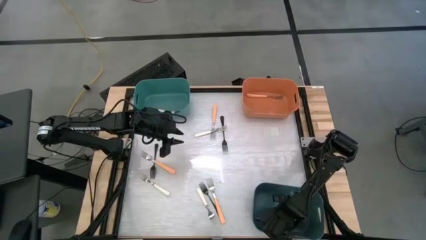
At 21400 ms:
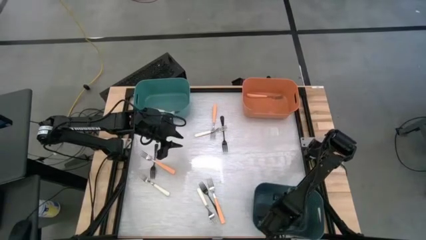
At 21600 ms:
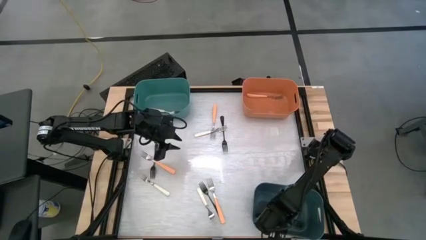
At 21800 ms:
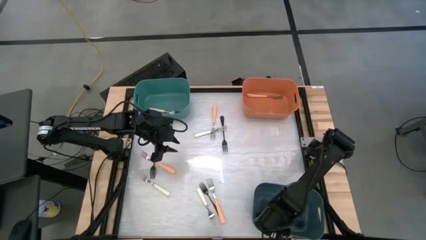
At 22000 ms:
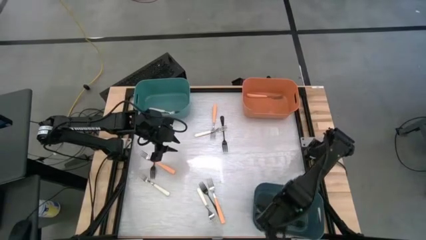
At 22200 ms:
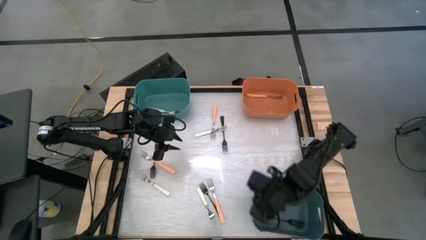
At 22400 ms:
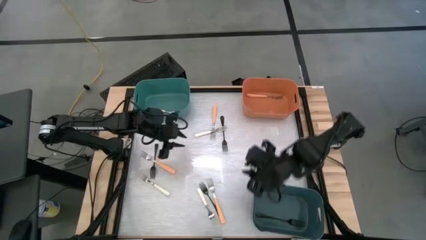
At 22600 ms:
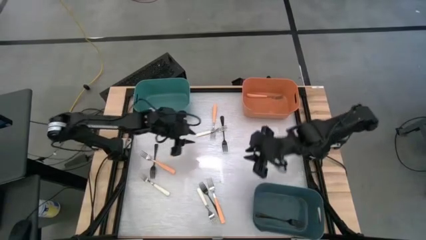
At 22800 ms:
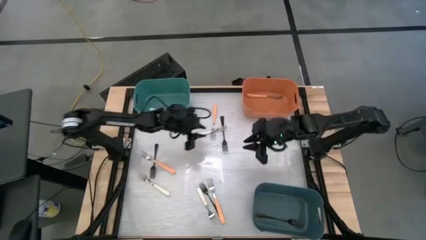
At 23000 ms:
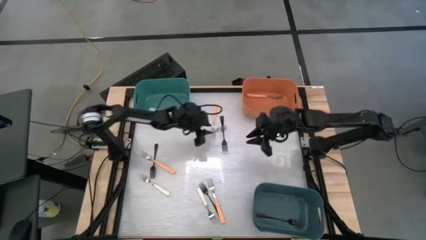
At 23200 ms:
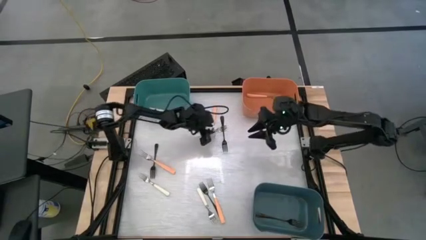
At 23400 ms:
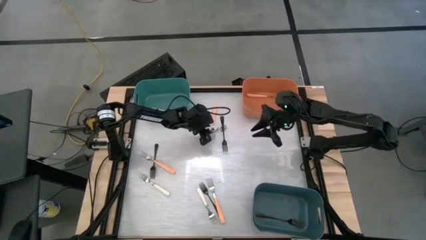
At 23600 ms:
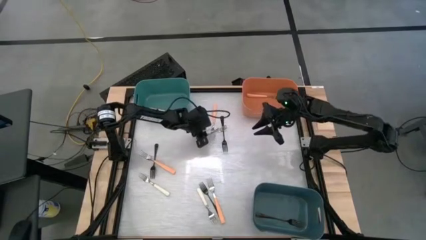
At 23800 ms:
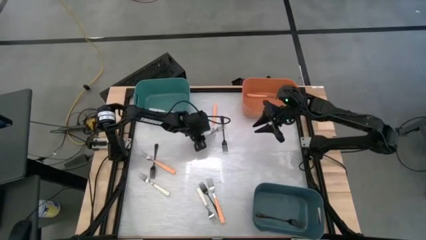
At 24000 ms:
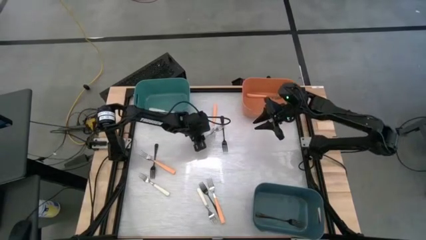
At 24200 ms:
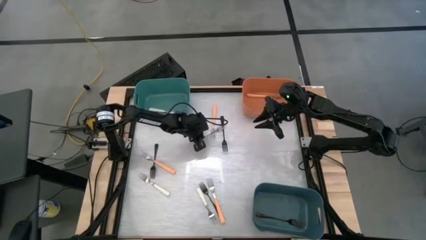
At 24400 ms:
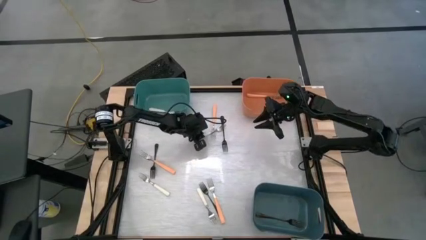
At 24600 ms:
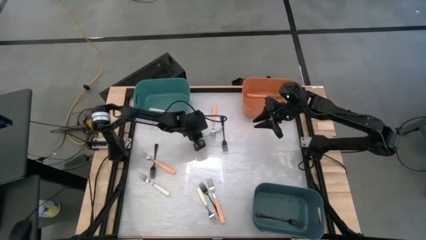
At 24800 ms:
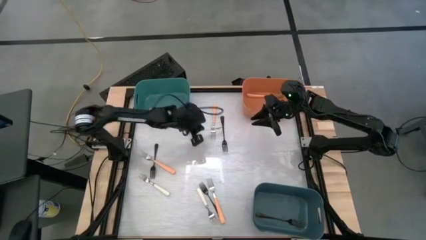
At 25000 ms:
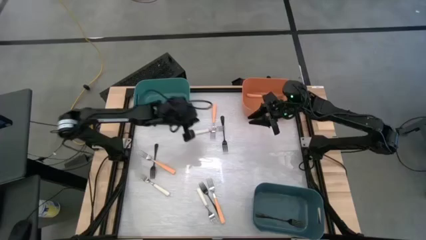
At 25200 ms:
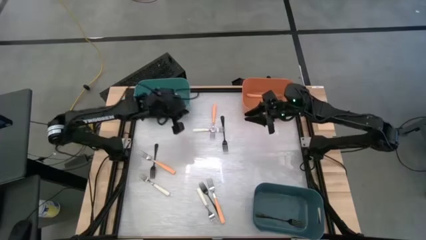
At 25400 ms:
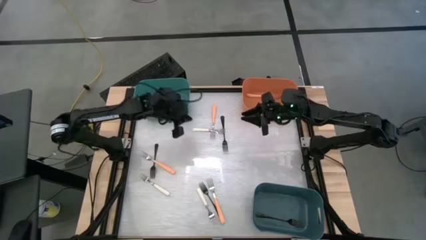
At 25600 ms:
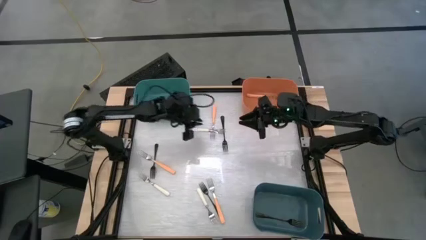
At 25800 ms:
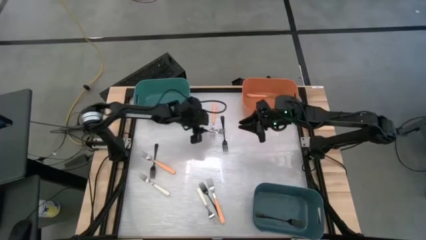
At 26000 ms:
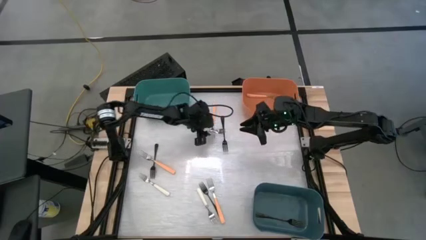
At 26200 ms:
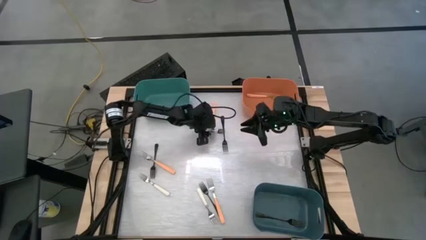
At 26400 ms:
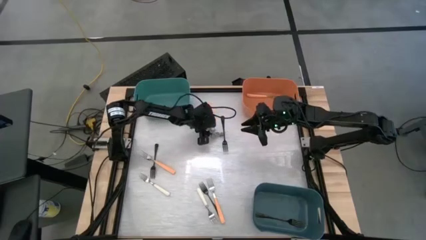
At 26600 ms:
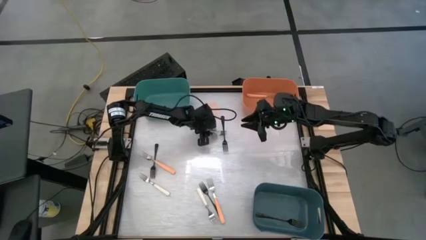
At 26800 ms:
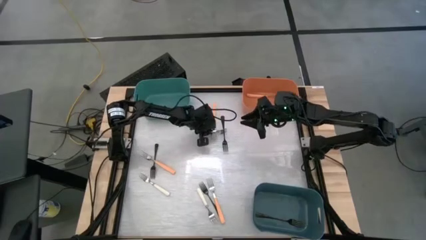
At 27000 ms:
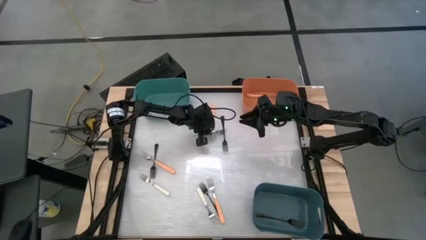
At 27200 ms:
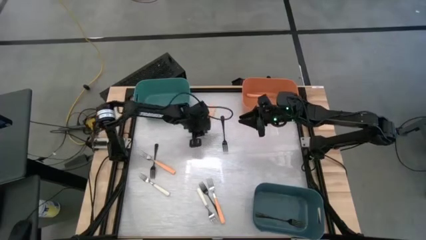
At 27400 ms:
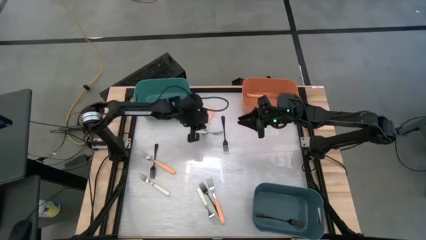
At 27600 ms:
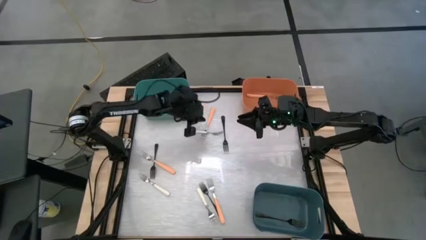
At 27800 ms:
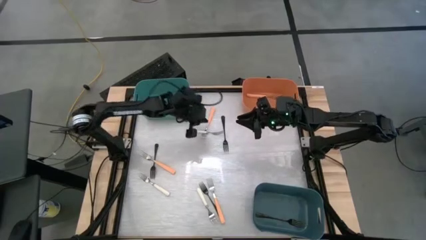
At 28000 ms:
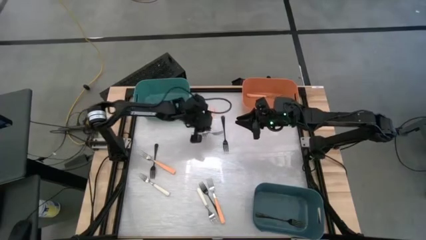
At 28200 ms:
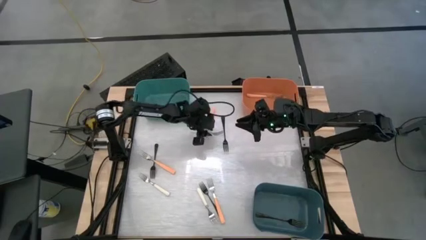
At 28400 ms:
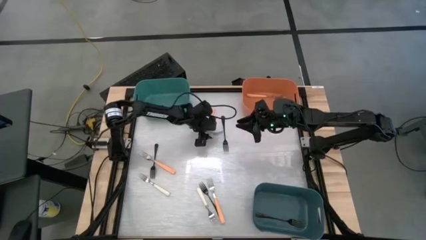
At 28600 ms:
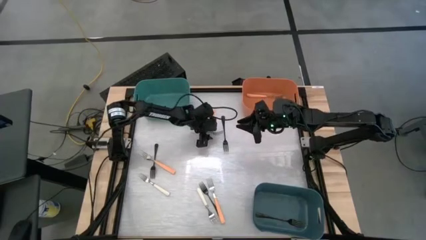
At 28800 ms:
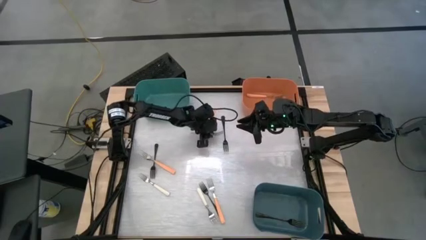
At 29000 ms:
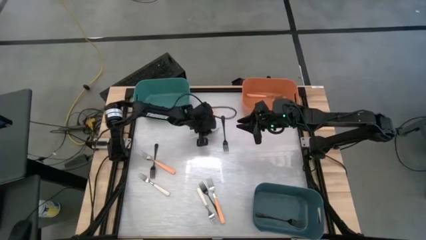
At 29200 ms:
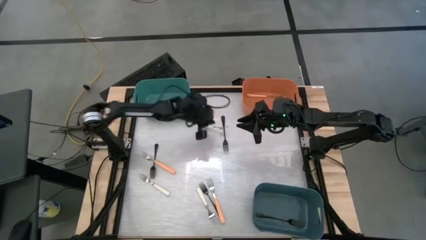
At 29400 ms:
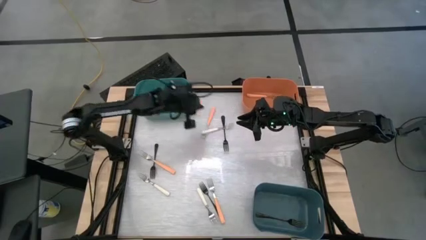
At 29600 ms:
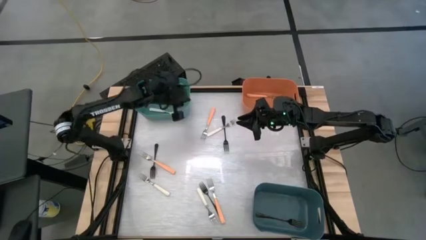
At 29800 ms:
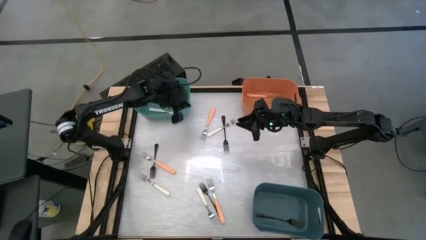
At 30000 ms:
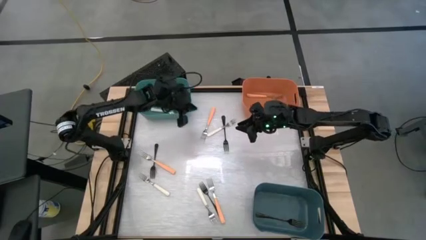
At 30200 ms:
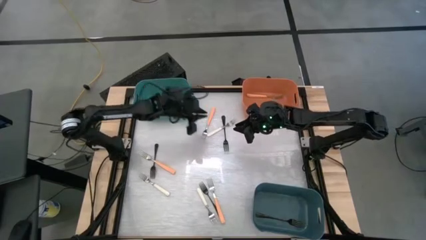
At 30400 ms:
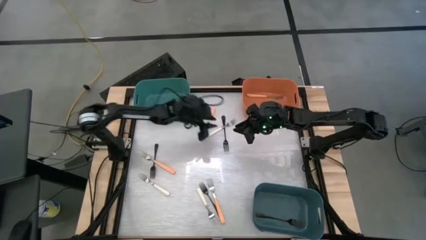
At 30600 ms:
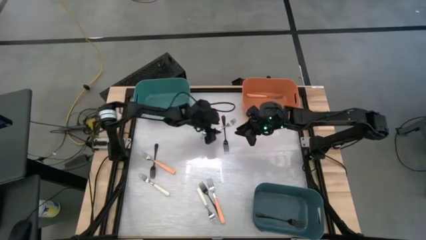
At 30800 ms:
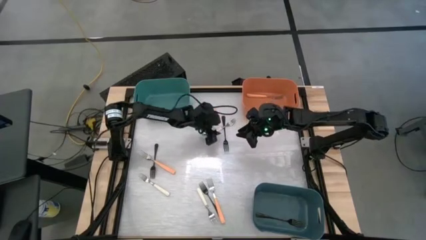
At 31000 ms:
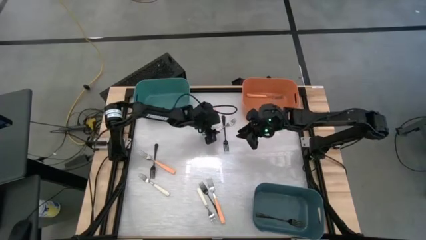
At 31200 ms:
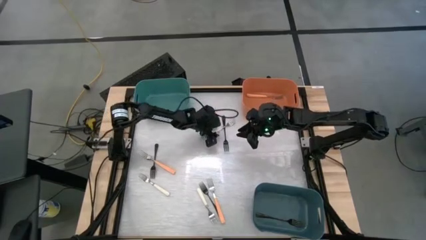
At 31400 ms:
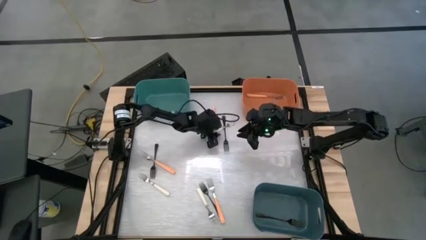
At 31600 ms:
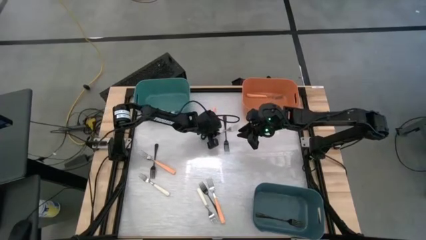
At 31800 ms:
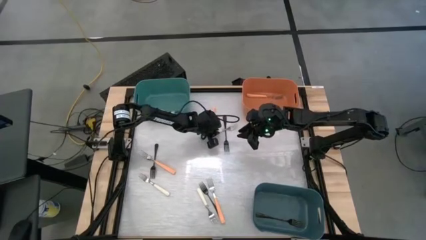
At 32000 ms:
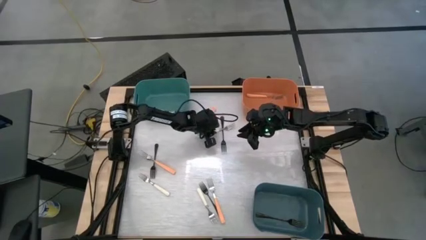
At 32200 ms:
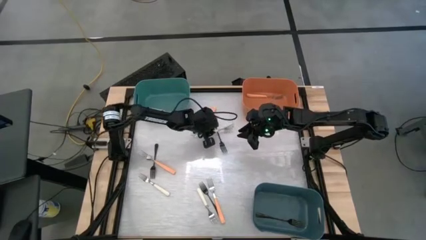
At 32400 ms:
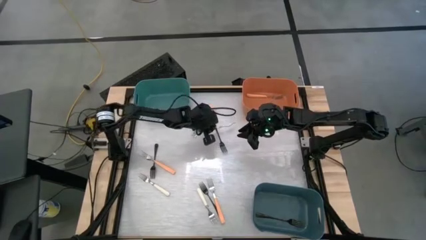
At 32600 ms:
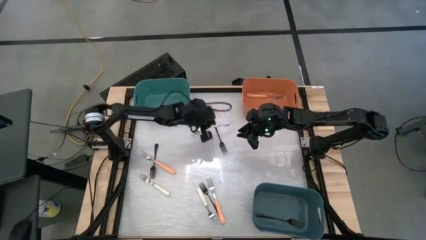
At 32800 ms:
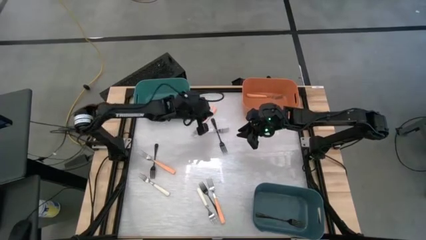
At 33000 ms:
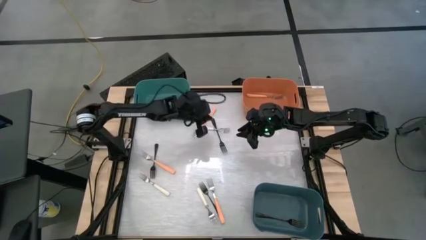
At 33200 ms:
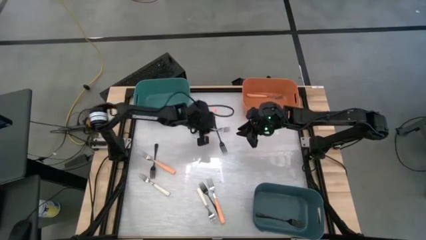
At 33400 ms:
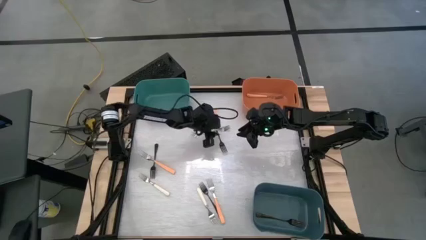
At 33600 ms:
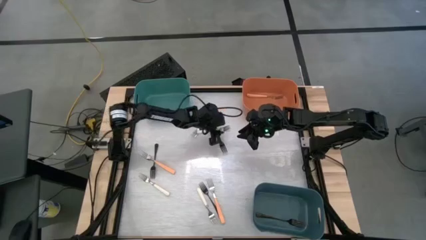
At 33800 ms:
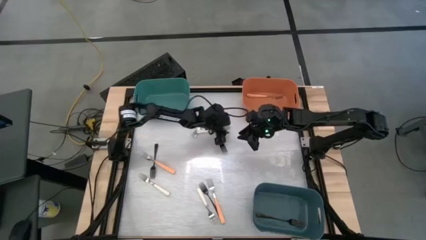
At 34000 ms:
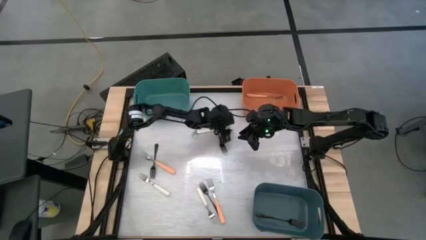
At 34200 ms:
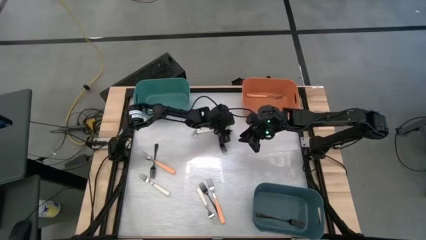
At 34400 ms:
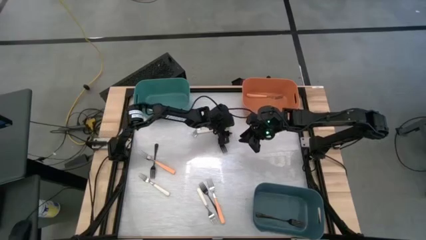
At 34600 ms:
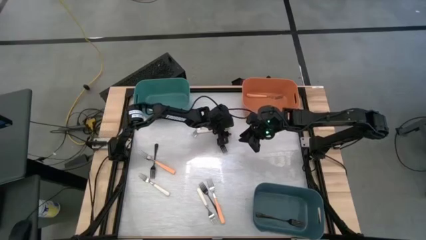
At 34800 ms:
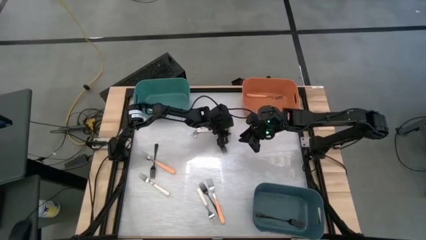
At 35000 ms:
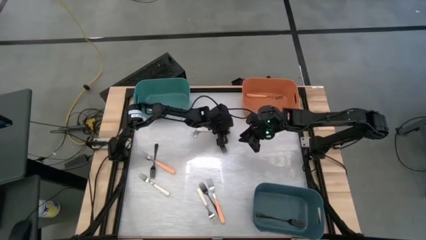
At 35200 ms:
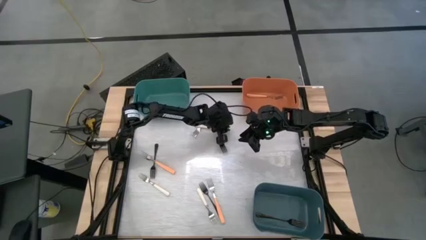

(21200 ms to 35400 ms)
Task: Sort silverware by color (type)
Put the white fork into the green bin

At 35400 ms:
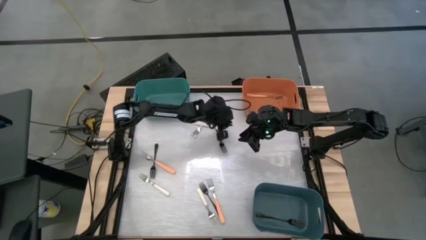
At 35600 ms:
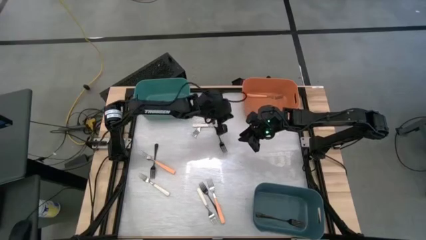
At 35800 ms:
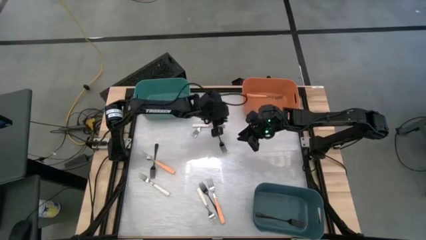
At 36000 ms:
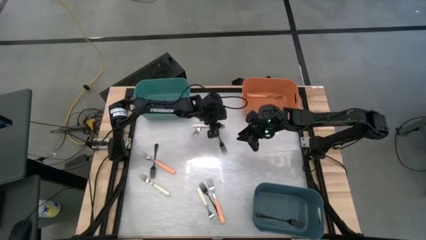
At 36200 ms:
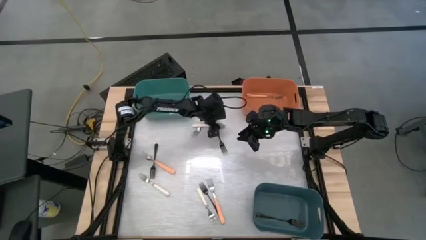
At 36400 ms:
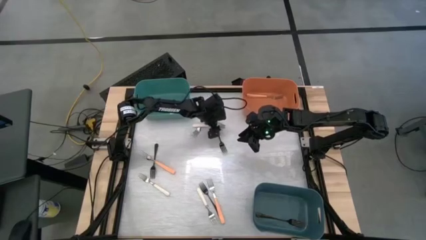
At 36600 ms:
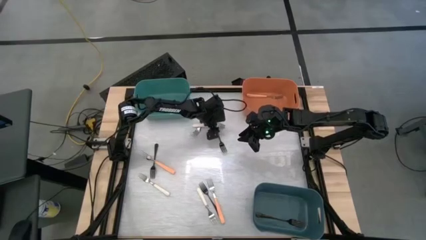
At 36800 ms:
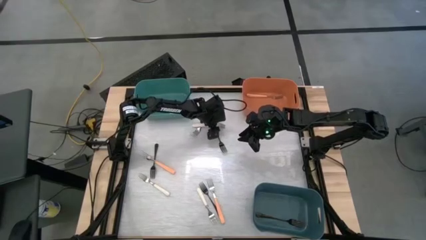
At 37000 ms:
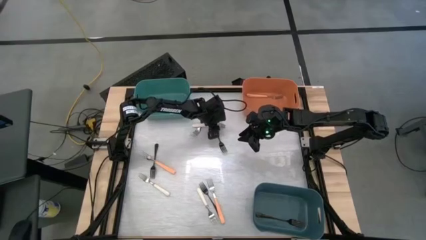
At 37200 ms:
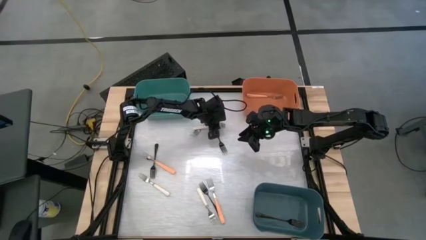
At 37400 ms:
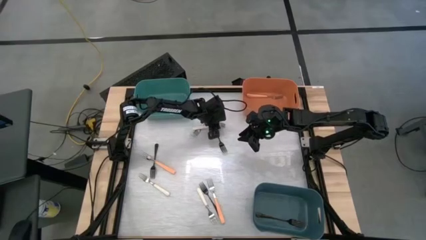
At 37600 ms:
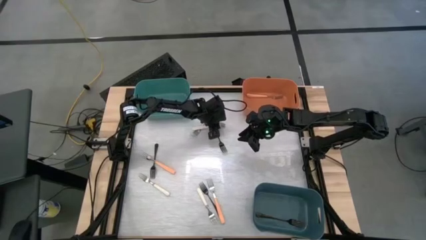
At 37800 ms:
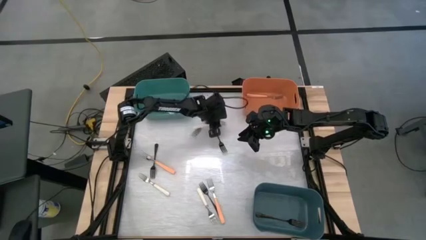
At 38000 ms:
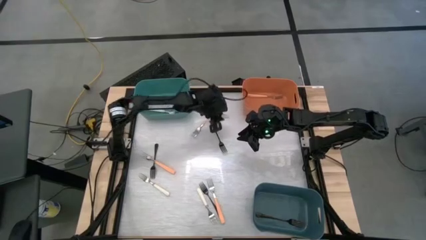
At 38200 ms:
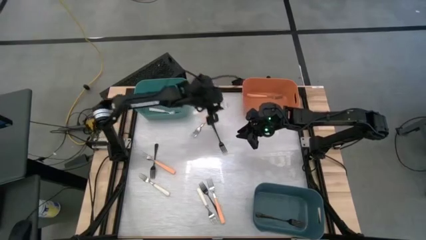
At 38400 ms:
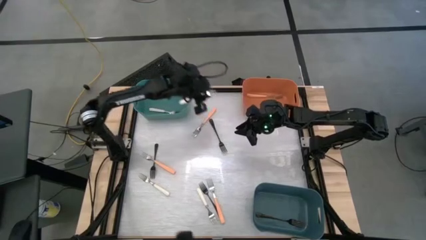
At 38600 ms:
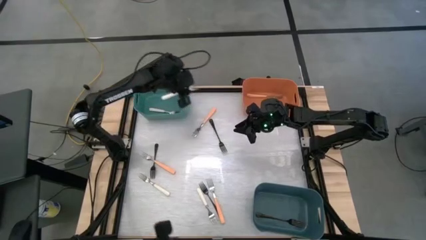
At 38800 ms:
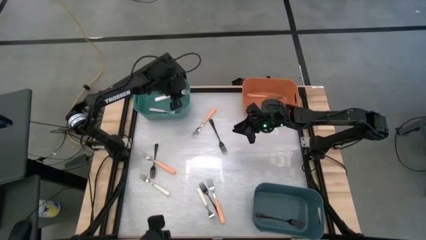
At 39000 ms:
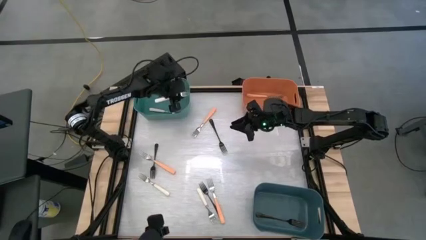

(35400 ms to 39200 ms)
Put the white fork into the green bin
